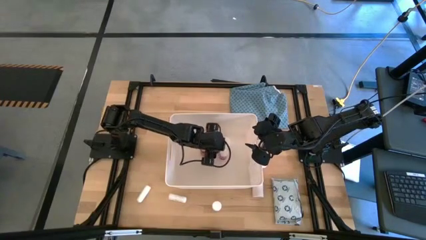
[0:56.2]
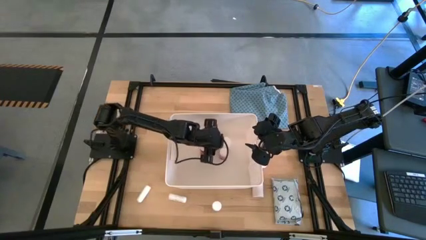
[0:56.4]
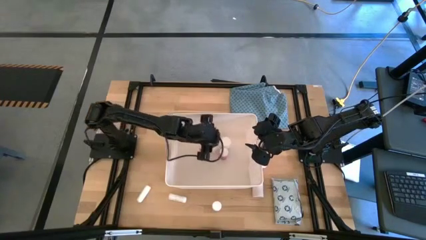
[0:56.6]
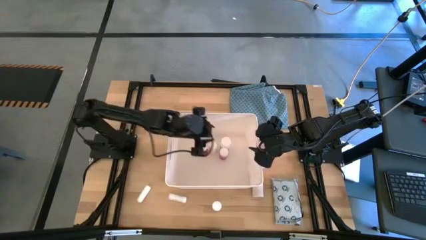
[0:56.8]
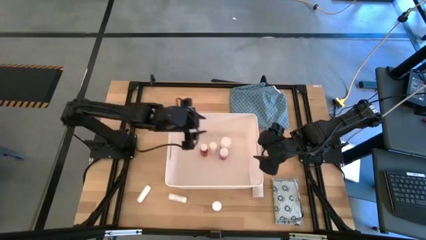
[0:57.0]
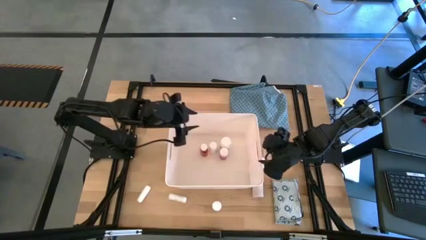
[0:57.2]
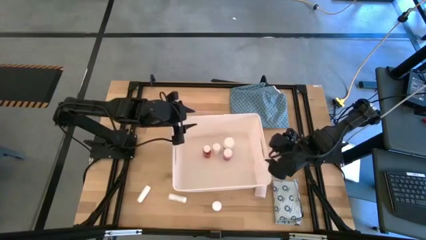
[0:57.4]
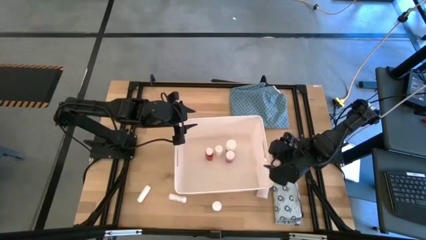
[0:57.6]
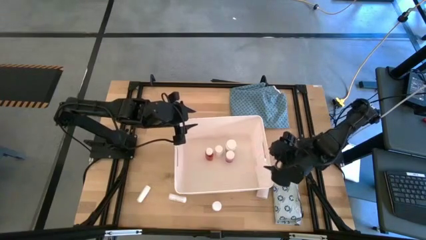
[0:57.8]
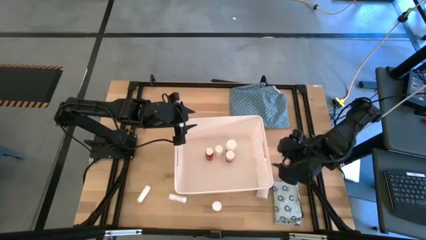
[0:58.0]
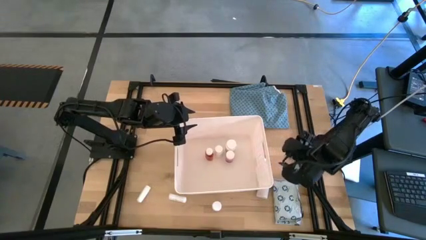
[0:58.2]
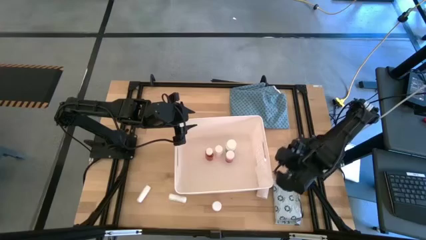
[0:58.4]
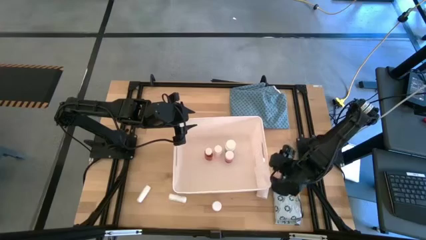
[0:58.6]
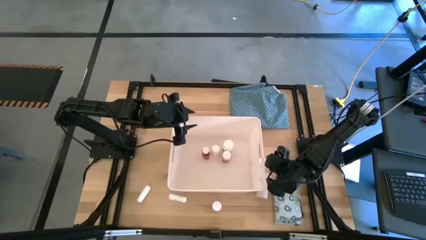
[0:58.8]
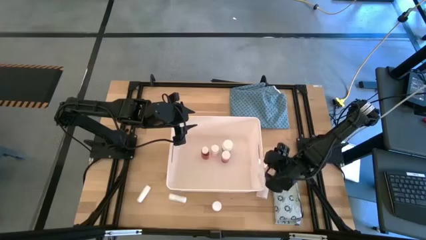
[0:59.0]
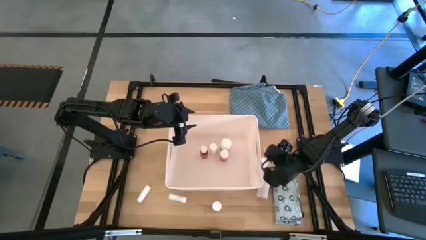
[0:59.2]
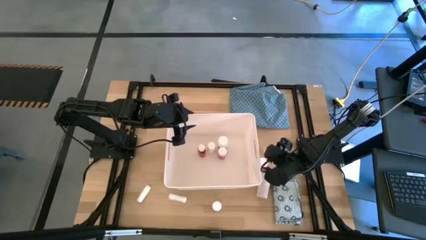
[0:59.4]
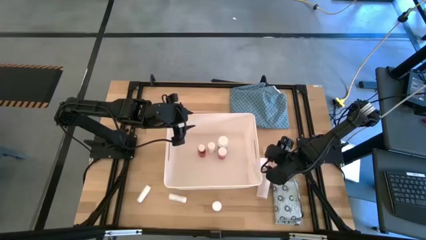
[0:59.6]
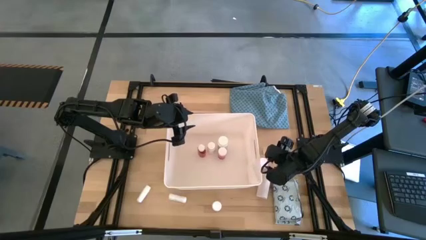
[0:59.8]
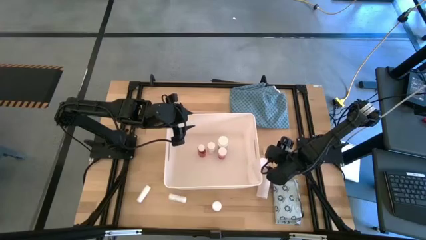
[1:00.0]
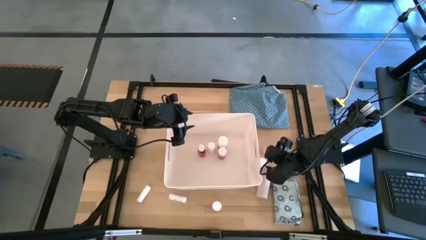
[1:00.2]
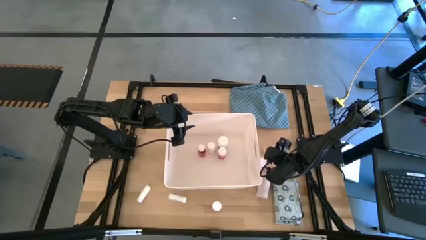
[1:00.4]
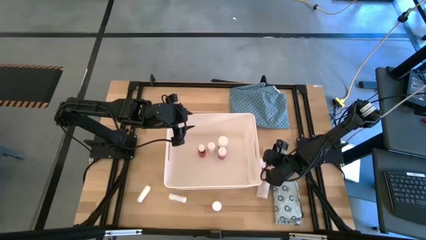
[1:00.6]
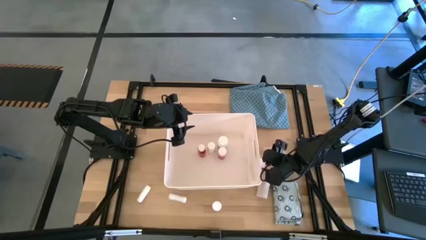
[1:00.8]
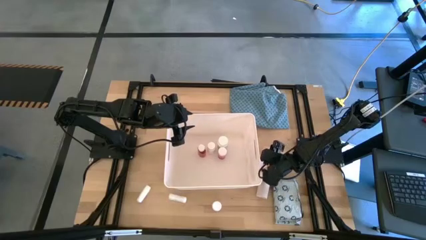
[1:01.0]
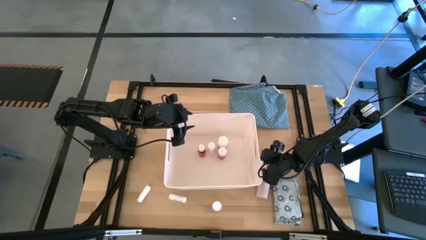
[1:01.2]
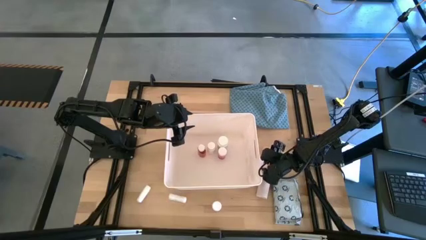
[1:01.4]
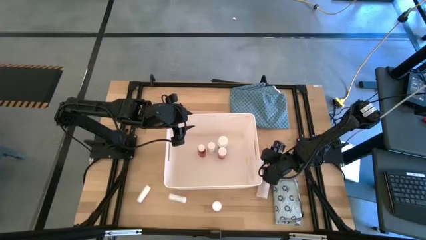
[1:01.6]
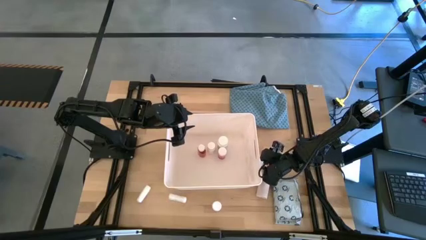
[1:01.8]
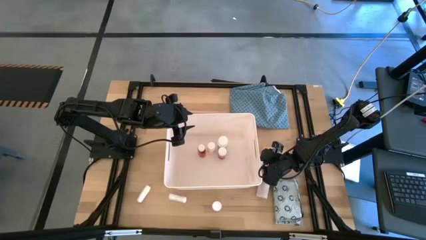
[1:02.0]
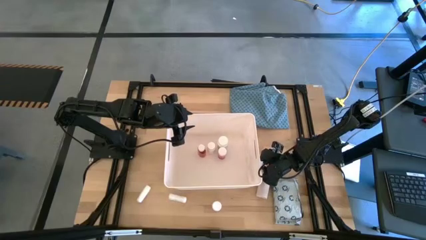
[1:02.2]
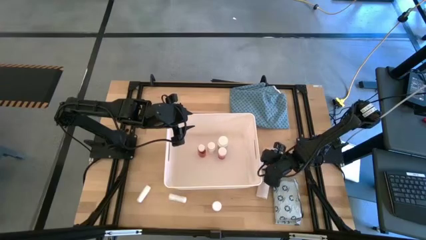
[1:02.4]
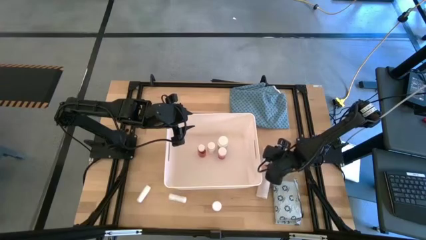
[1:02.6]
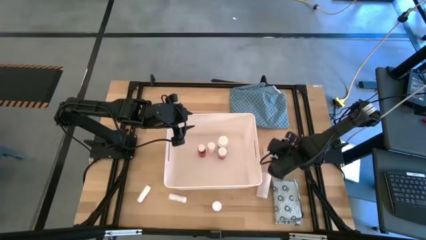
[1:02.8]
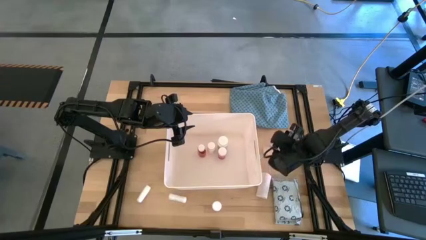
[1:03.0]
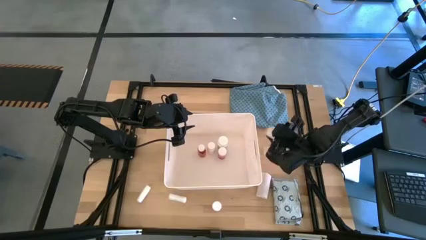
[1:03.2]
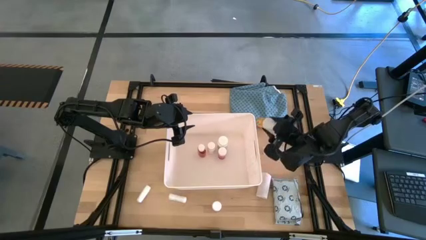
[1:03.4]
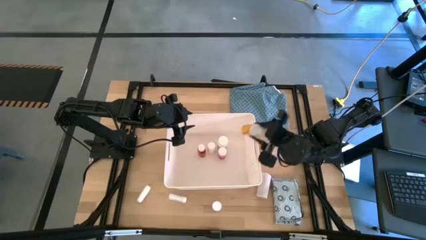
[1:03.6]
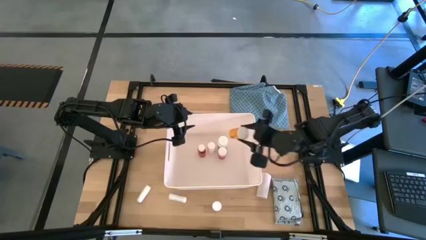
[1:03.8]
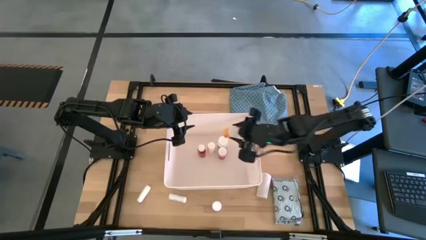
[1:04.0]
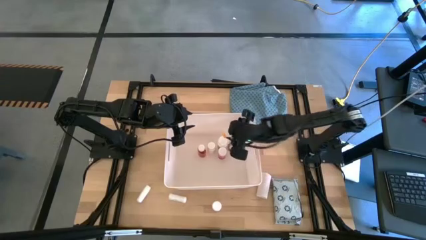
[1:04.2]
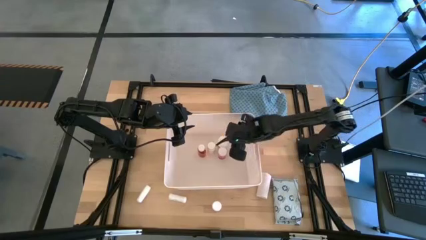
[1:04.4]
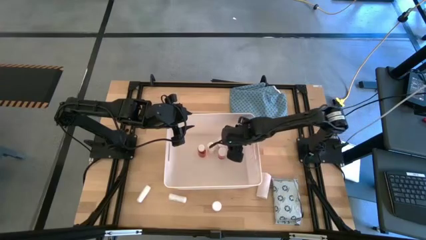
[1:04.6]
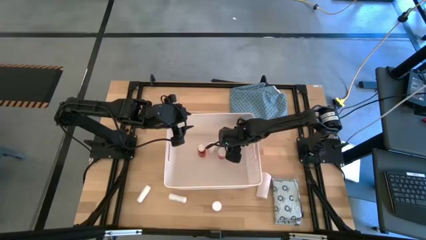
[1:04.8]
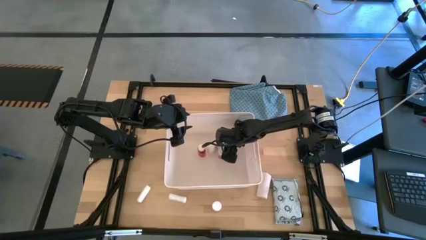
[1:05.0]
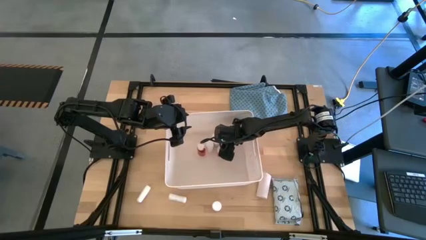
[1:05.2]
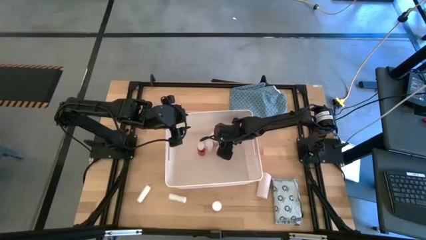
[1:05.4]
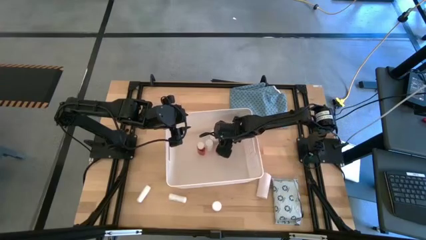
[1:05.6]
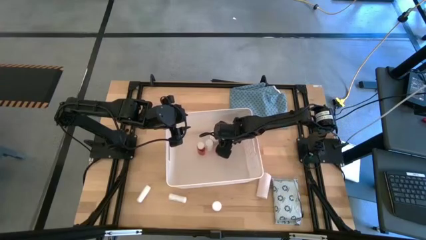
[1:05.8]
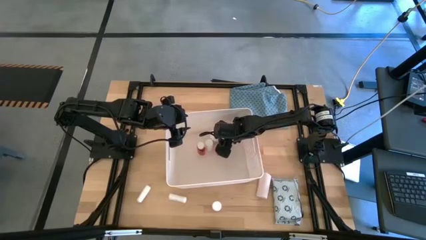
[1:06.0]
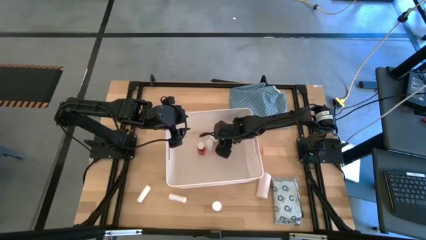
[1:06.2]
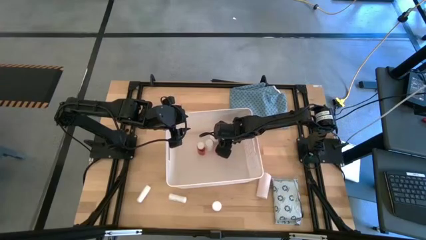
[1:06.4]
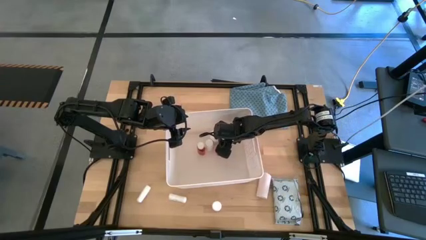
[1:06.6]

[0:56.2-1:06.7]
Task: Pick & place medical supplies in basket/bin
Put the orange medicine bottle into the white bin

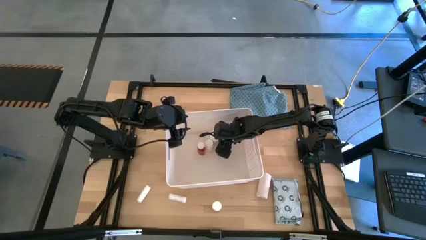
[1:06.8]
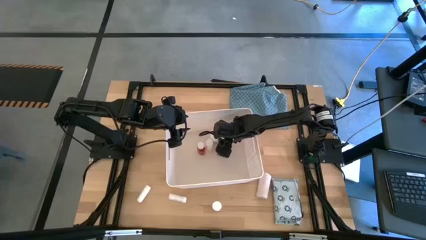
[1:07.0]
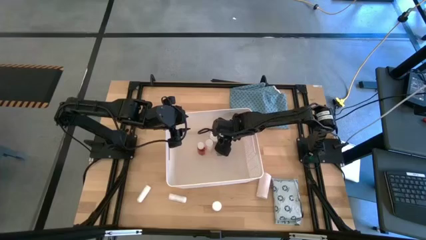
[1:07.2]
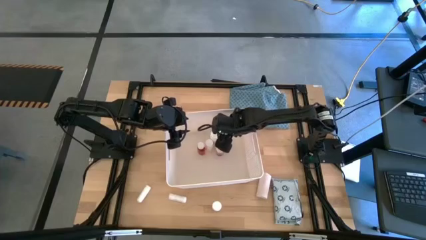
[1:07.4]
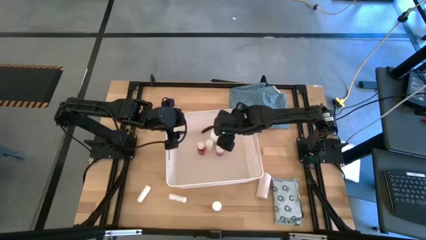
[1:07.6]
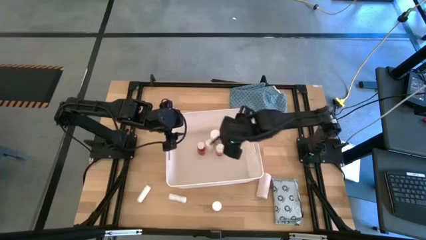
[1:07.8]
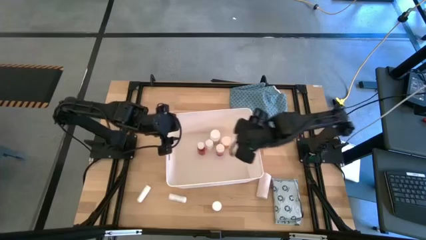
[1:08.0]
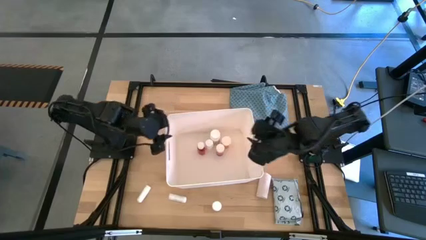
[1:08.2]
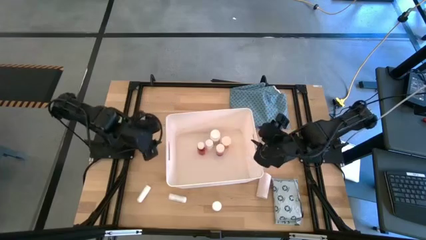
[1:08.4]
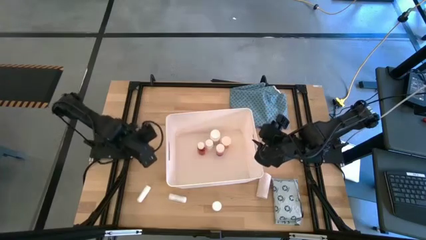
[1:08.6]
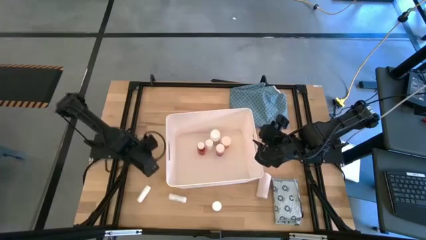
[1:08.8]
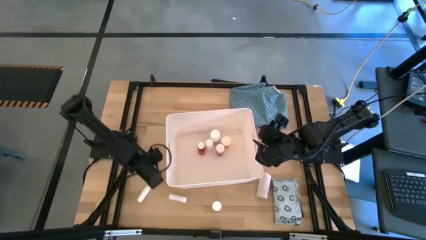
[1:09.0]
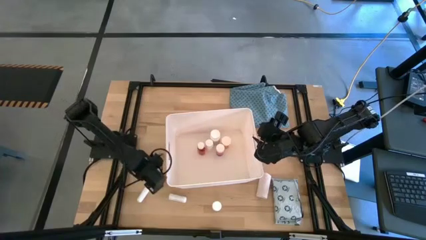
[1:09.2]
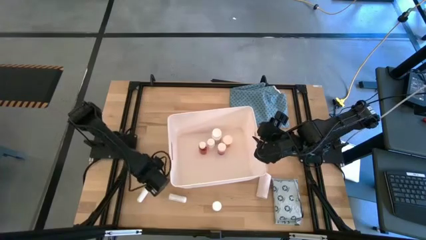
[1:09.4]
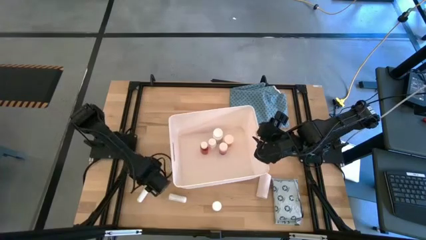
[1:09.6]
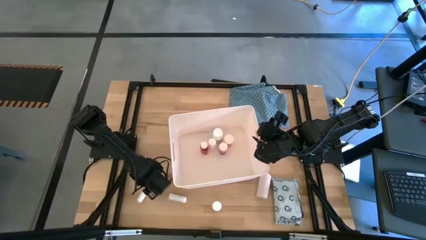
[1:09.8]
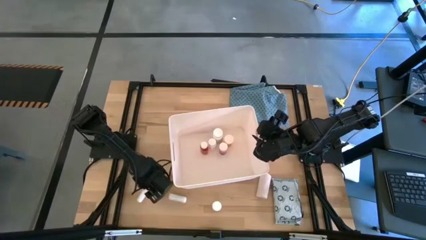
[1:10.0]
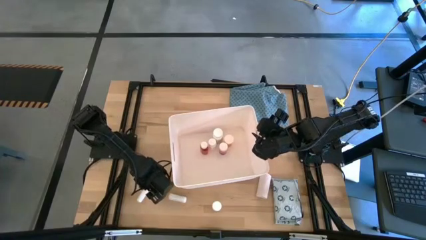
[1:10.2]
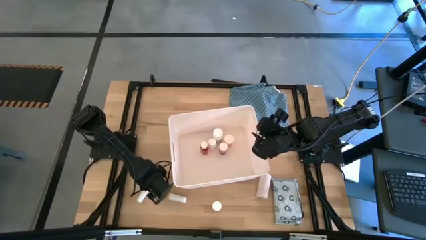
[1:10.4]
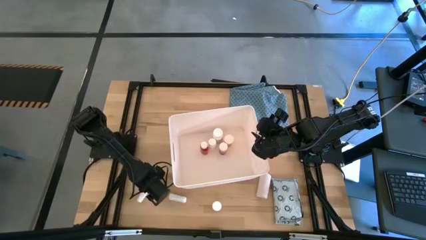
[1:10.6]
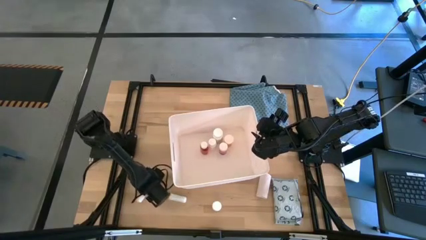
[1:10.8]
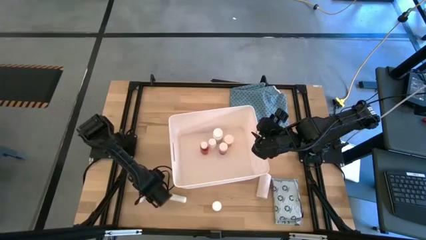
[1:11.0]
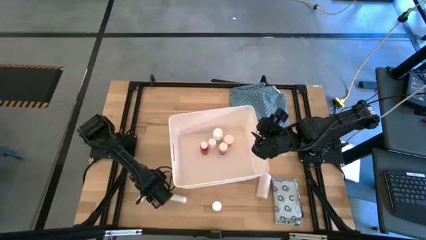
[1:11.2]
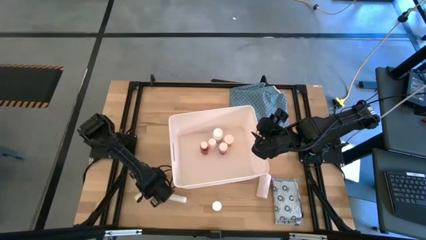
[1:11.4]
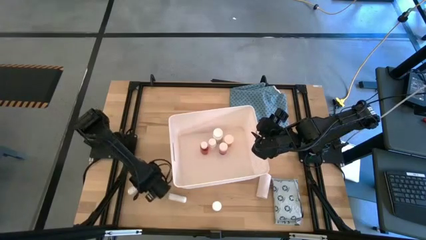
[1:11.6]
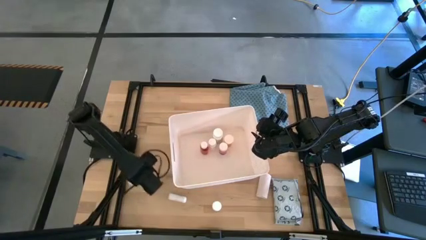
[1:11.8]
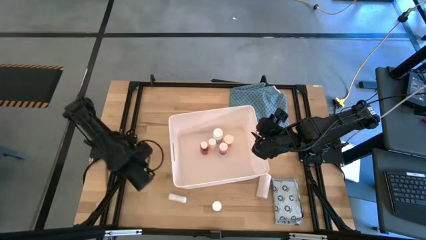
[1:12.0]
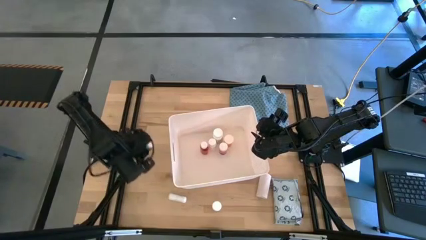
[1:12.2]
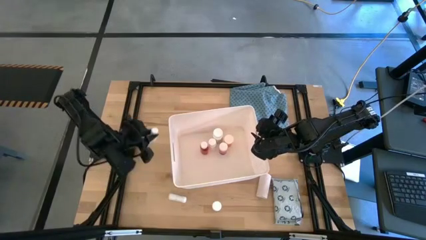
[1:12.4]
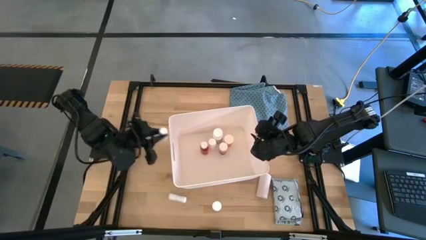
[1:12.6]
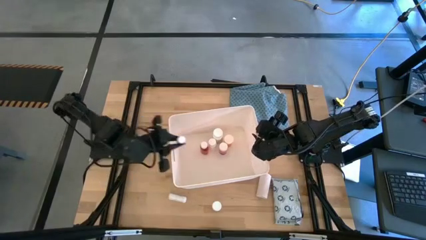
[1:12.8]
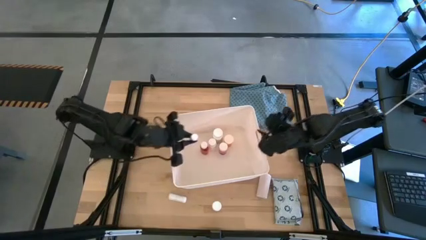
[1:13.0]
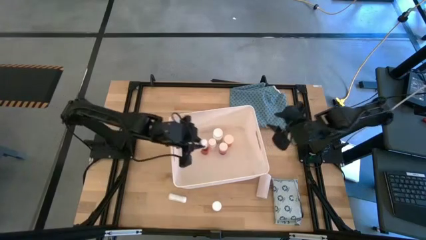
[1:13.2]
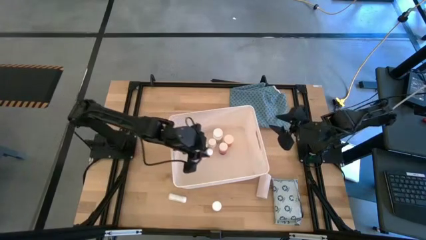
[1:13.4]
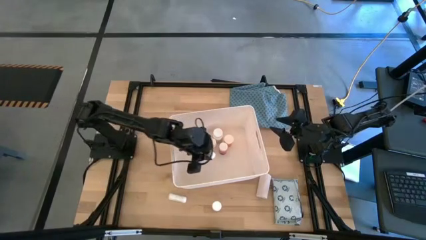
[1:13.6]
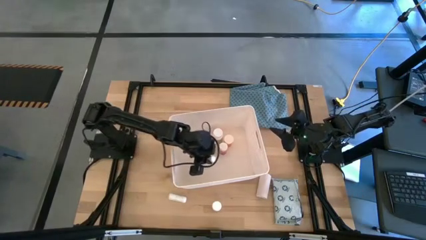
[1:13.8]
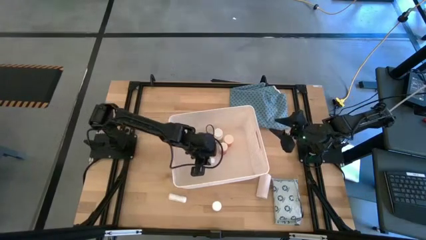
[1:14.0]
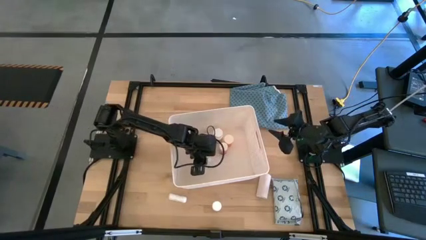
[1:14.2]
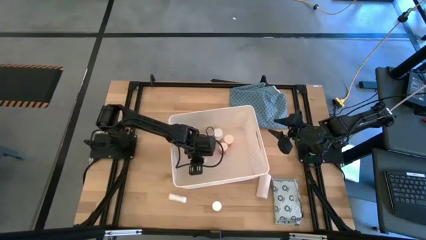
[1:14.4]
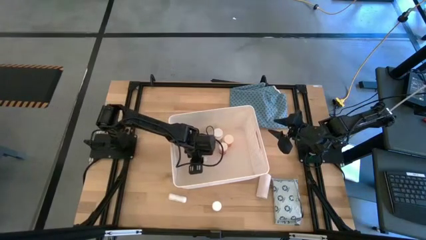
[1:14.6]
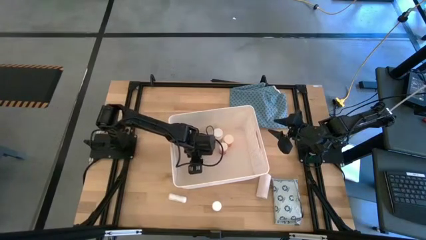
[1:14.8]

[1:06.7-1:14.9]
Put the left white rolled gauze into the white bin
